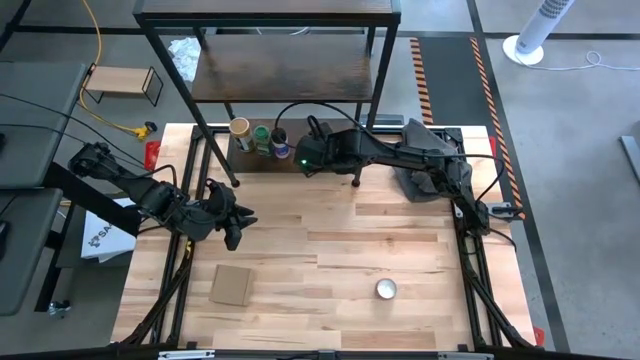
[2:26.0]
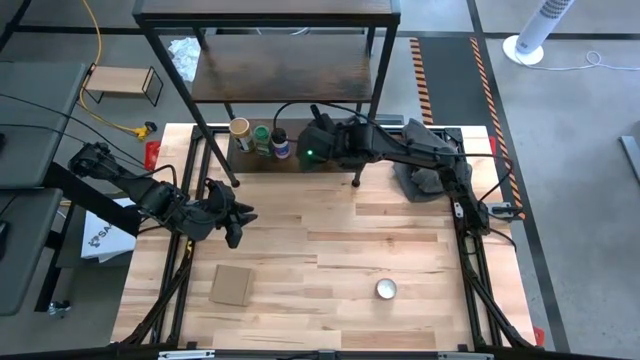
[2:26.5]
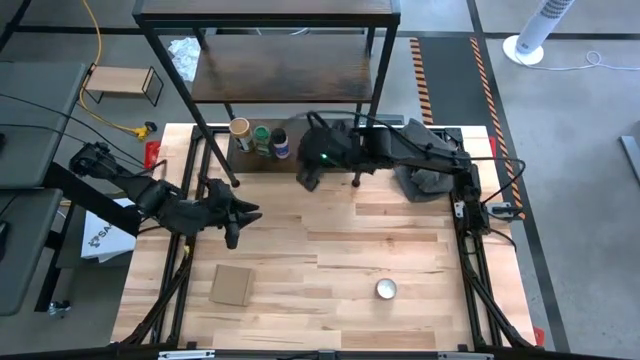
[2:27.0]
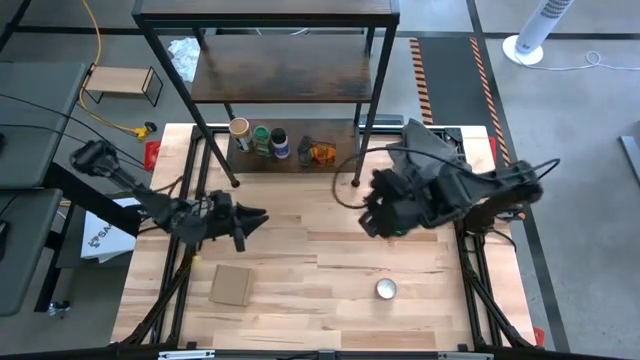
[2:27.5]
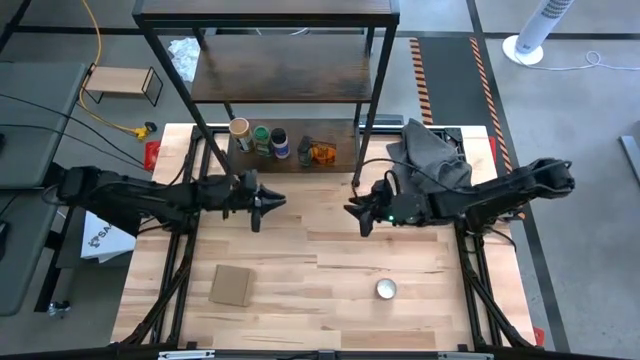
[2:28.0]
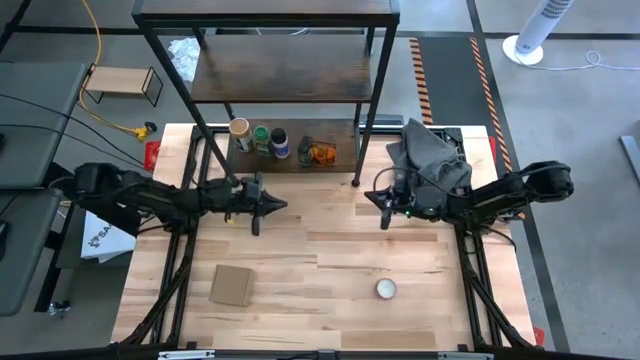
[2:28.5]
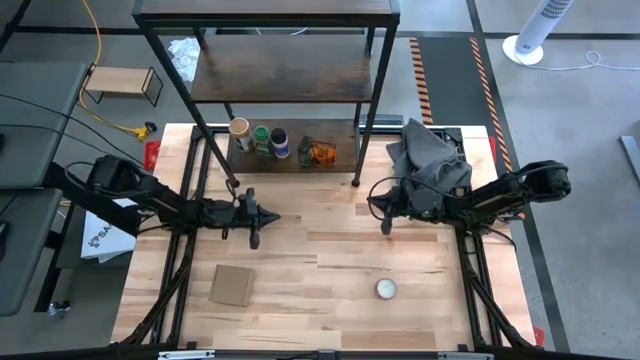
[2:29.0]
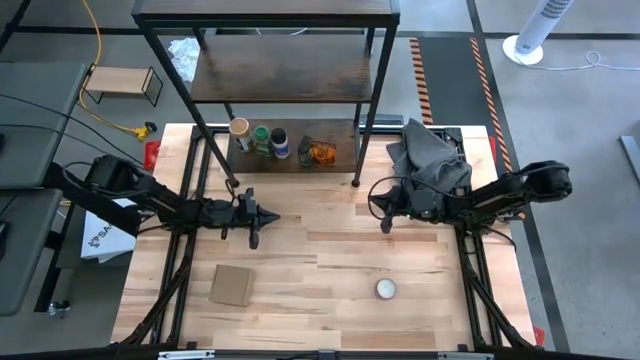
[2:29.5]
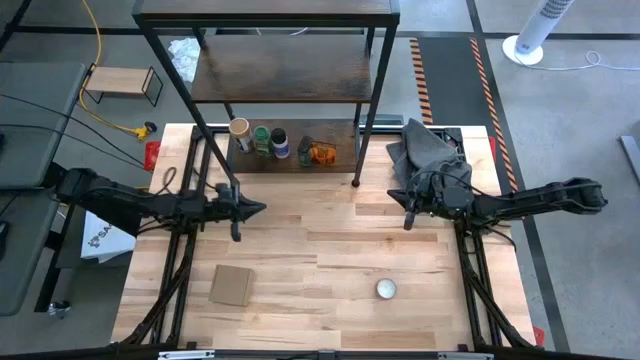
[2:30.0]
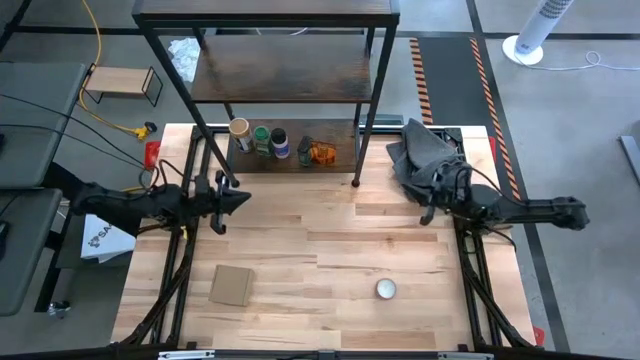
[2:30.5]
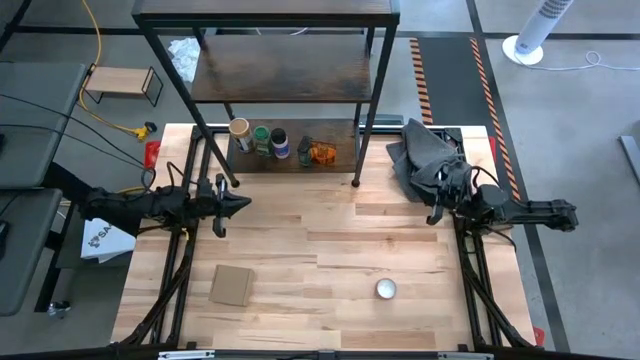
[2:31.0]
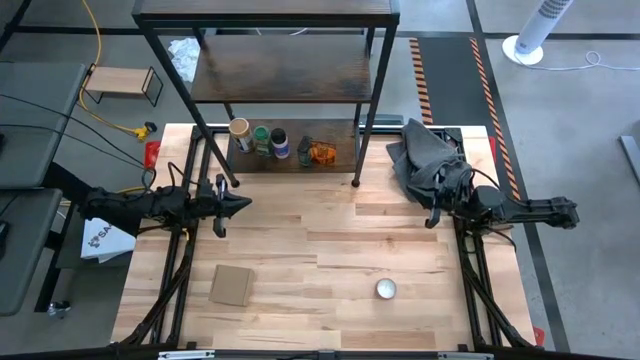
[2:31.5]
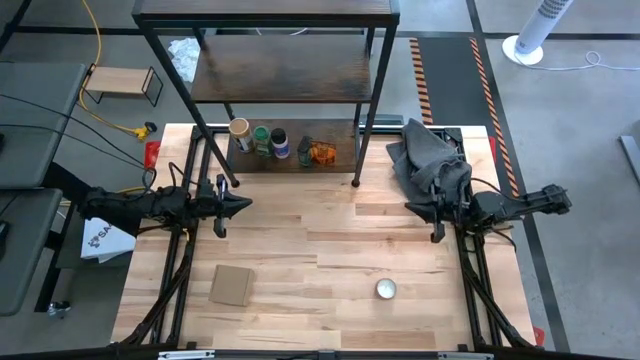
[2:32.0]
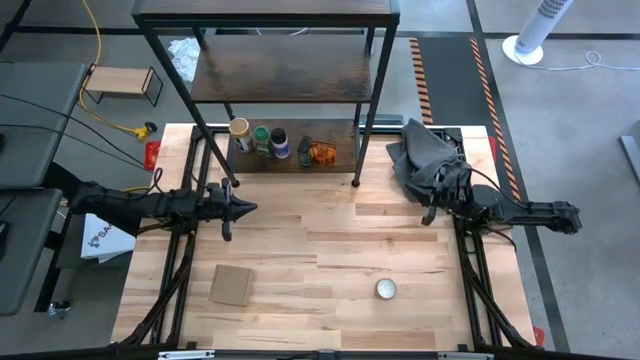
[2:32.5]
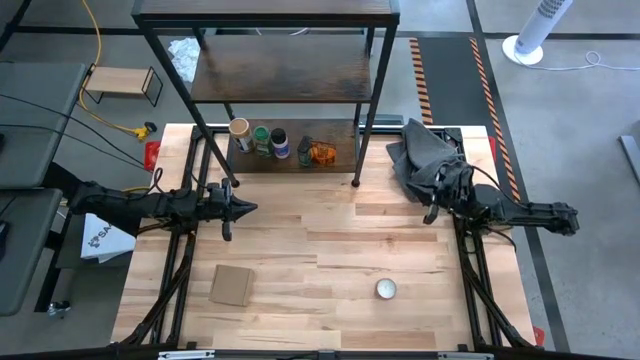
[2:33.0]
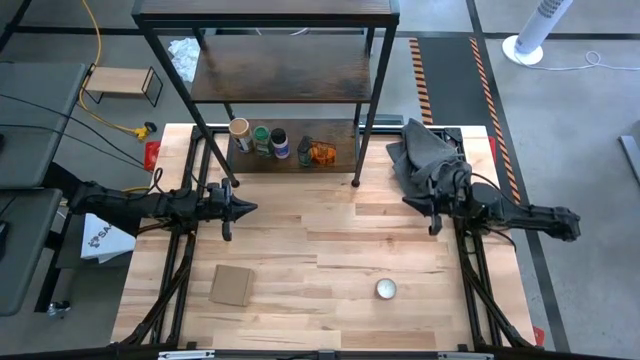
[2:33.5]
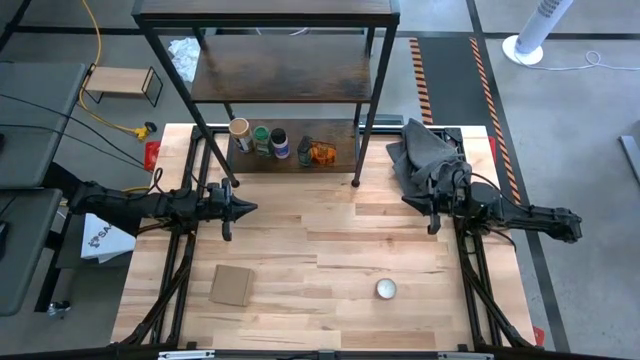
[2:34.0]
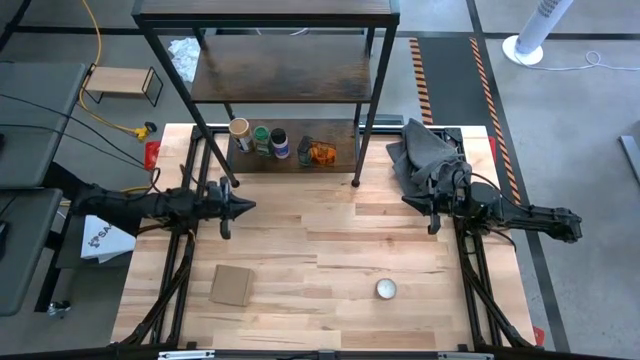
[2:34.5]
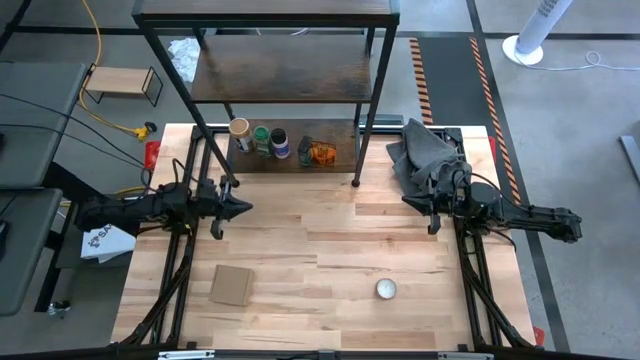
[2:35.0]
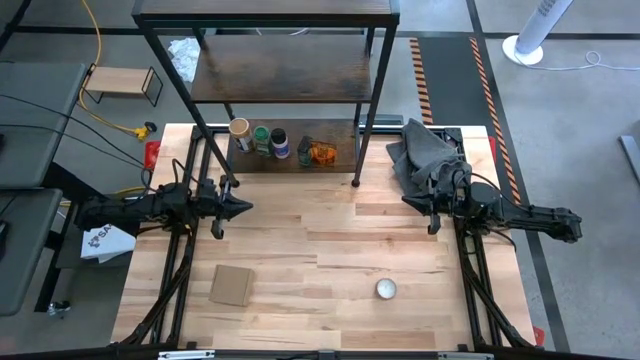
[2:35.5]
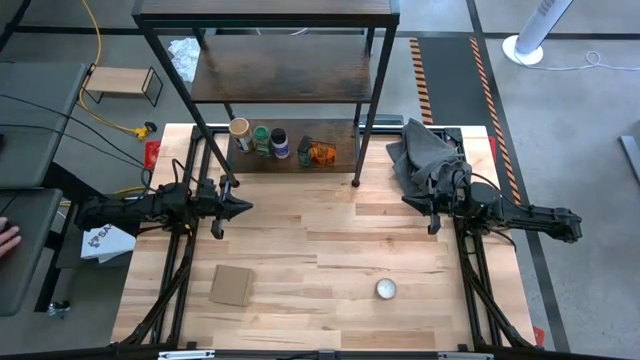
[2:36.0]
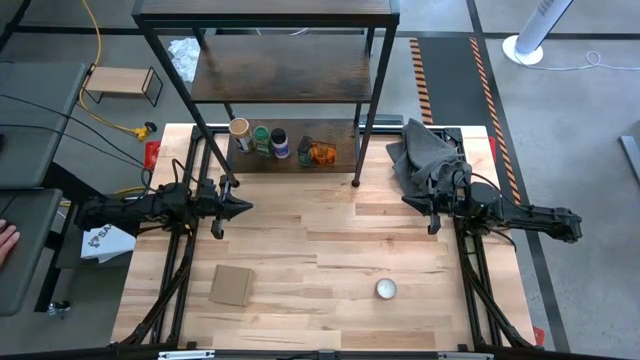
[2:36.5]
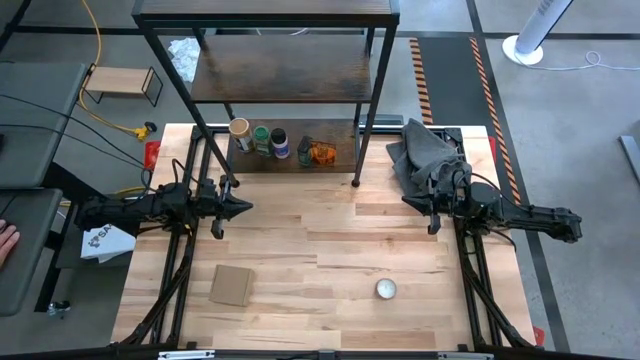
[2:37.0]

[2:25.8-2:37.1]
Task: Shelf spices
Return to Home Position

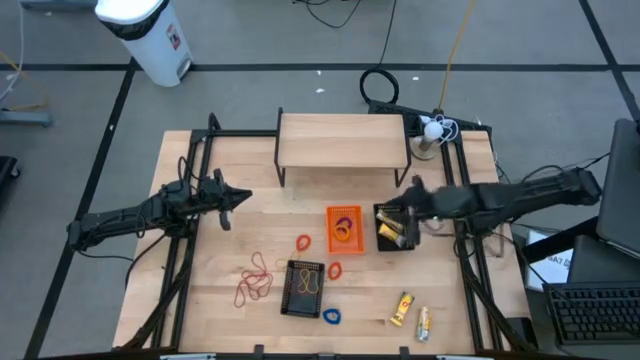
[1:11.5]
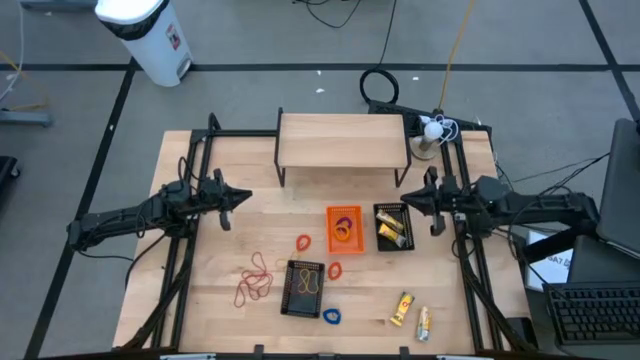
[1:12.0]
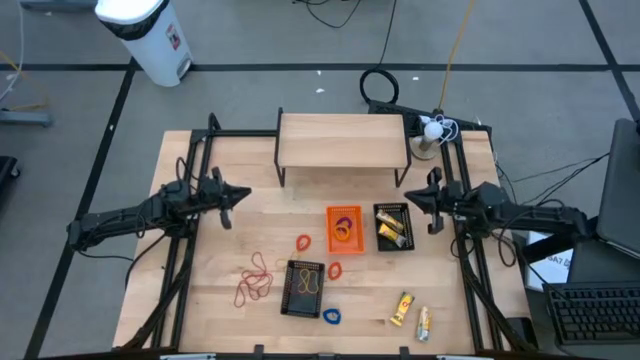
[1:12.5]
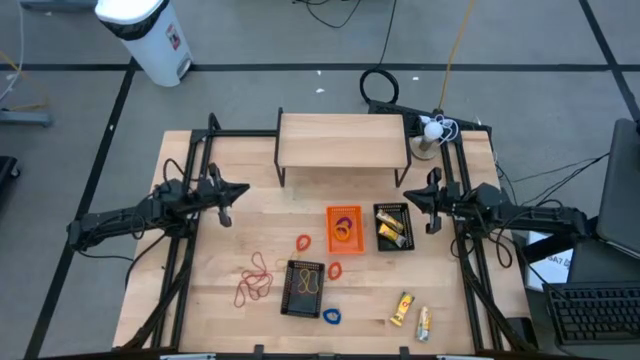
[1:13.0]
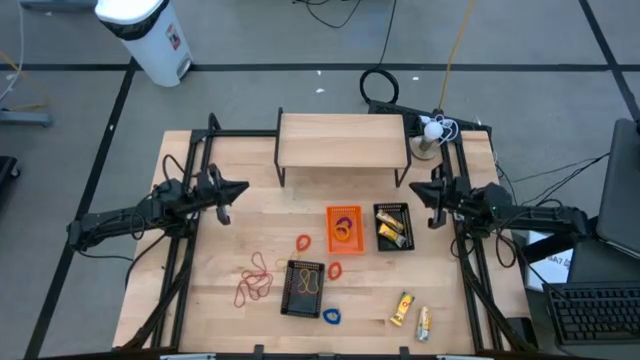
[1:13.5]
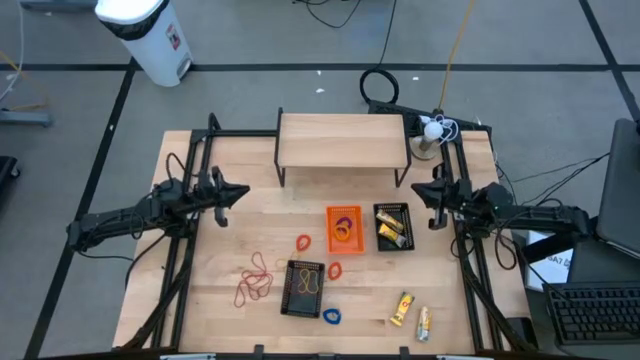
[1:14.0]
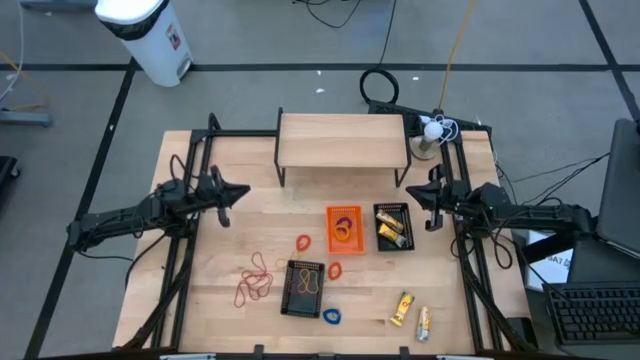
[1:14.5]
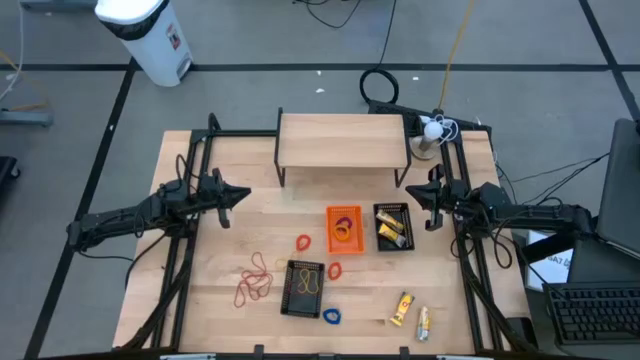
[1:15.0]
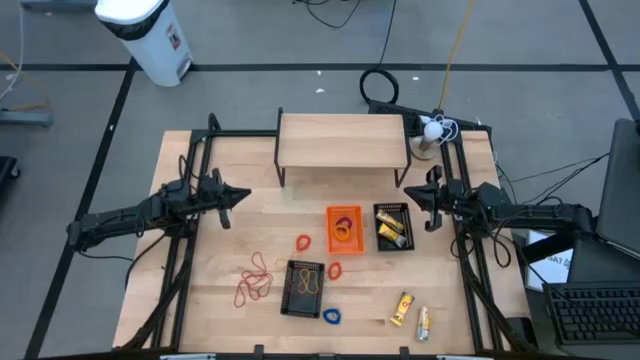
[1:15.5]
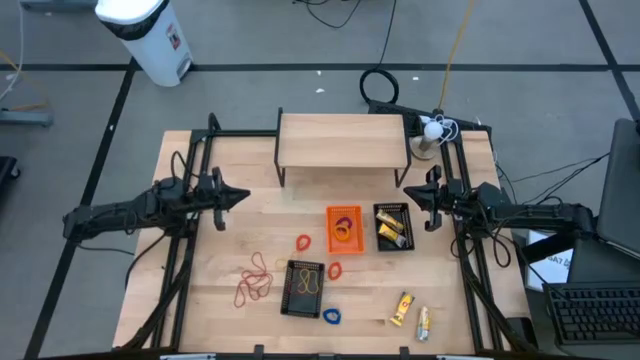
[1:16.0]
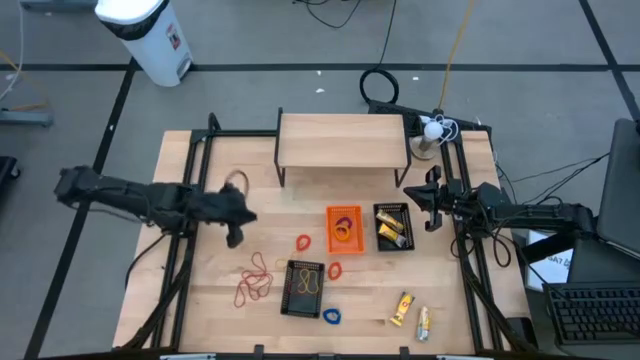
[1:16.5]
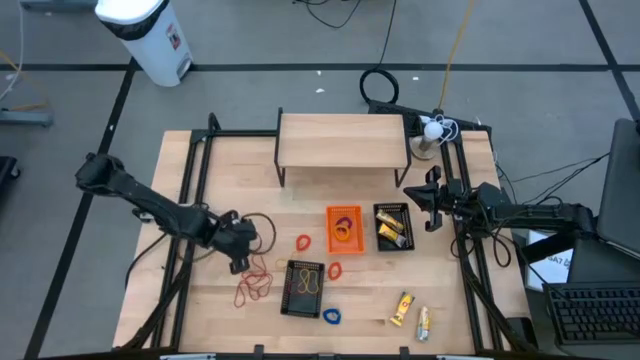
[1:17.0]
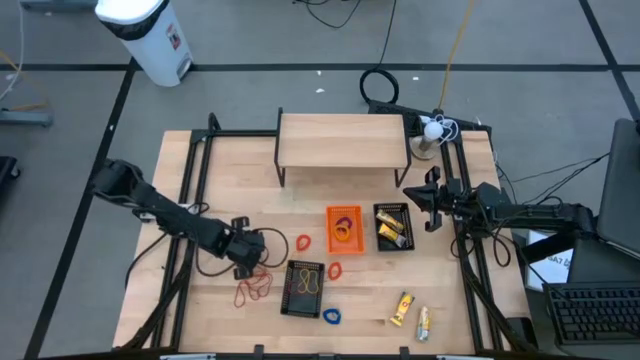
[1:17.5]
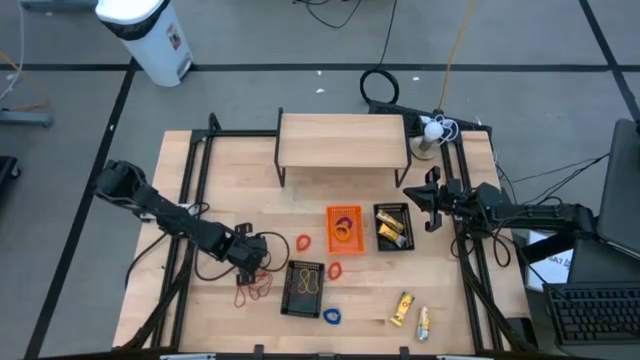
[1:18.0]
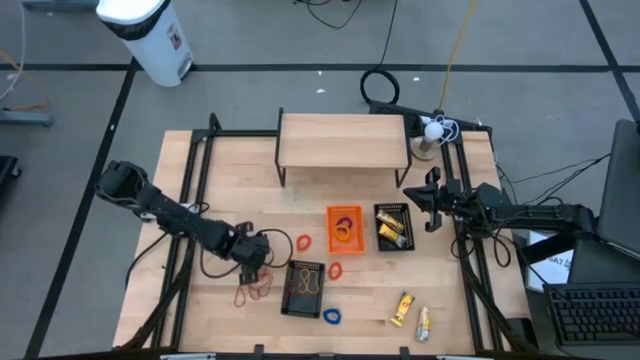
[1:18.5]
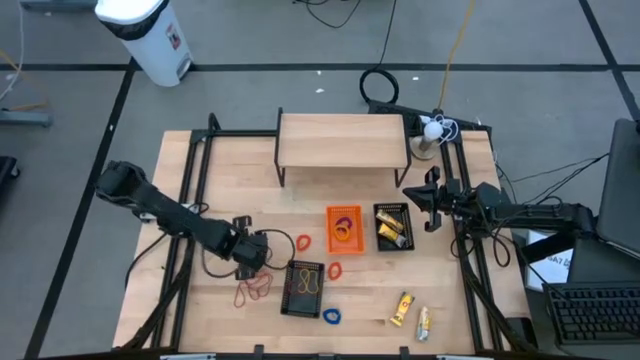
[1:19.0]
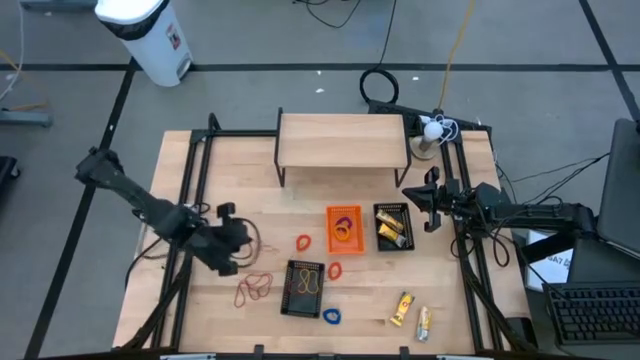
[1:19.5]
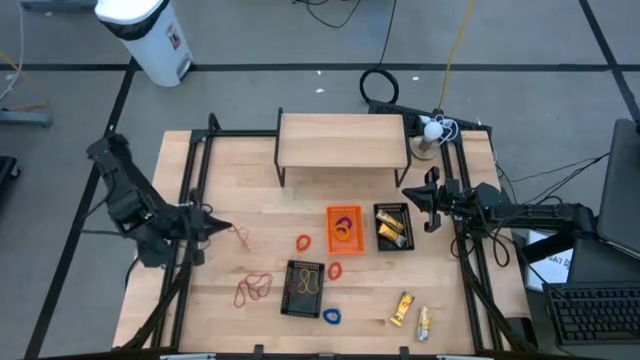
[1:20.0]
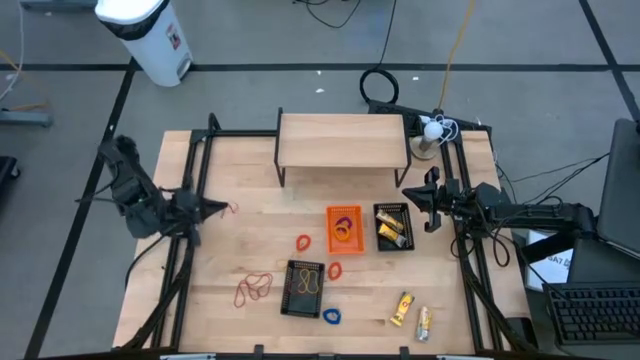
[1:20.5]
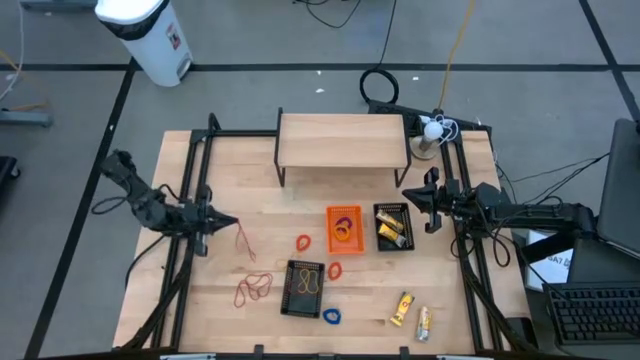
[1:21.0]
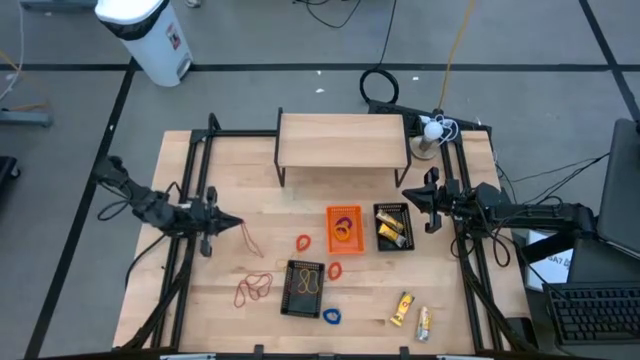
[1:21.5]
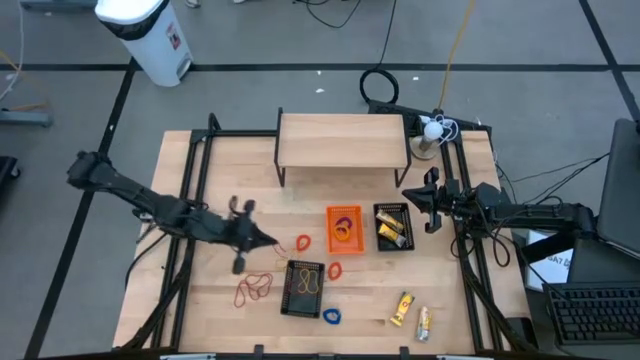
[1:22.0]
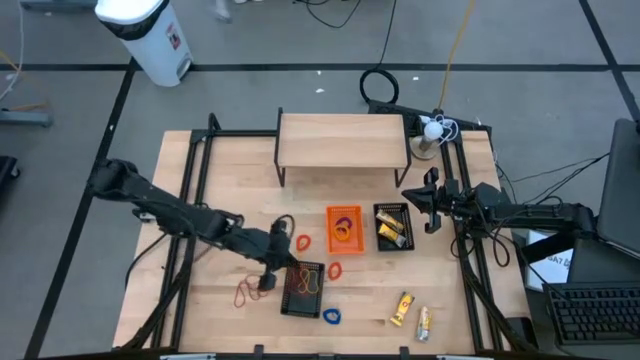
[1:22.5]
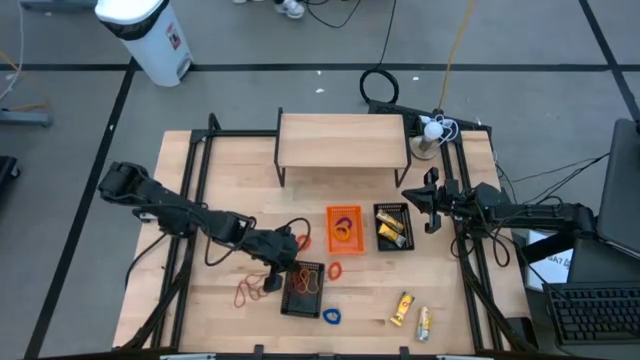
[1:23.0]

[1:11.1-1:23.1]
Task: Pick & Place Office Desk Supplies
Put the red rubber band into the bottom black bin
